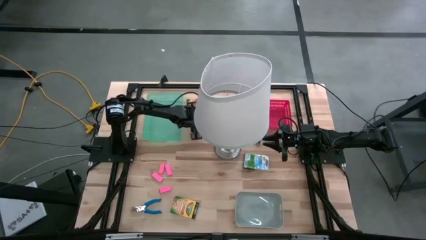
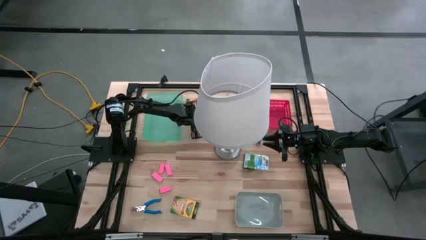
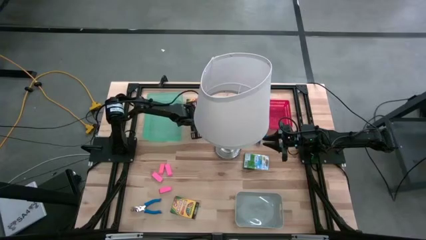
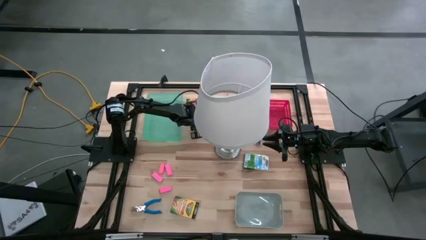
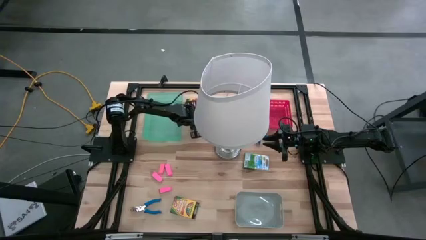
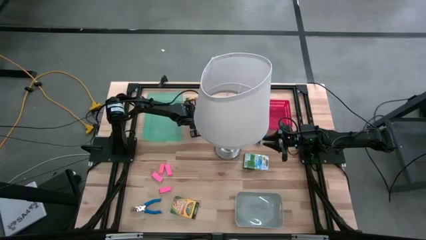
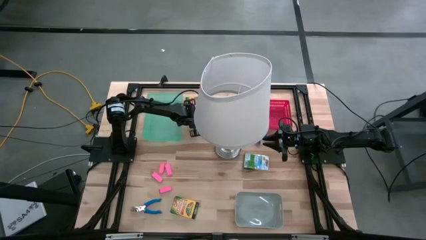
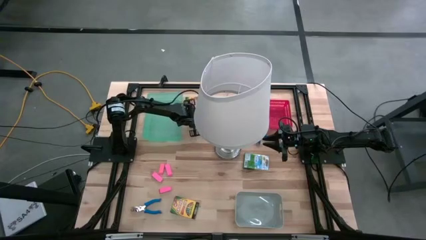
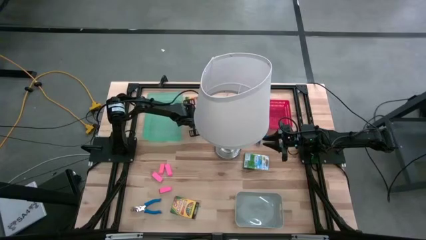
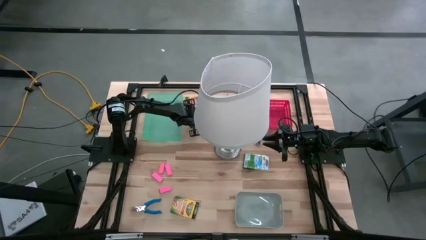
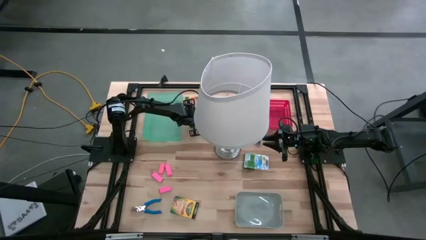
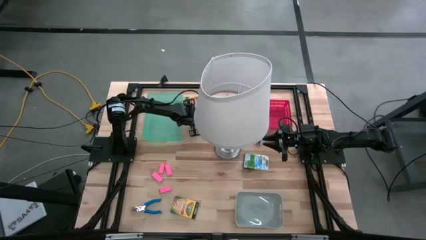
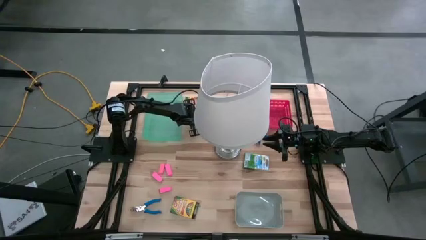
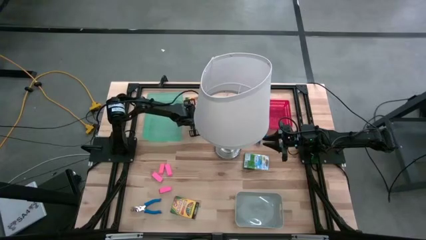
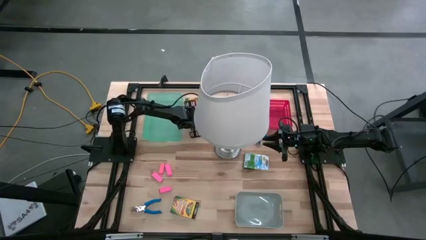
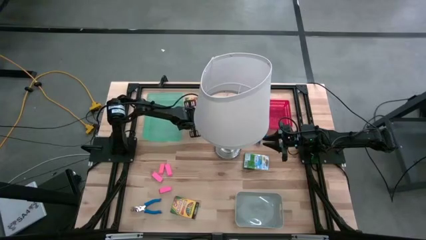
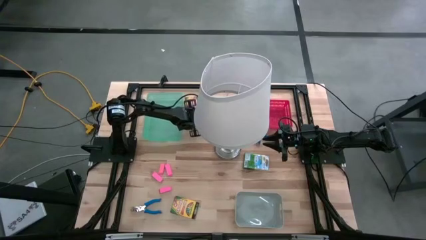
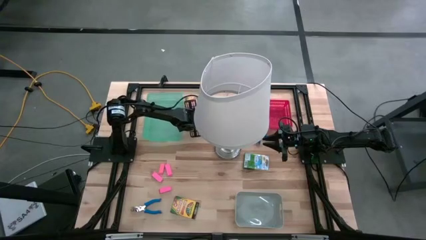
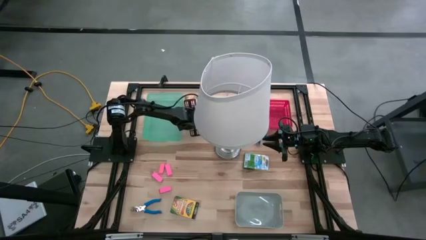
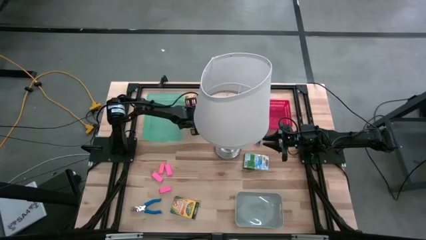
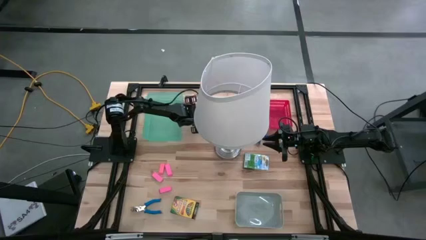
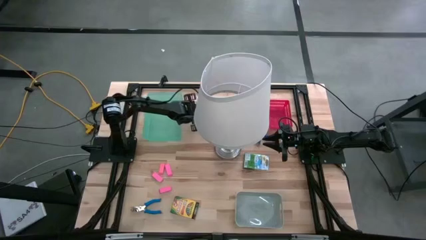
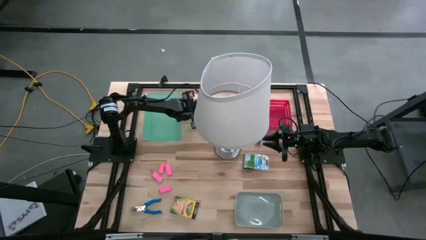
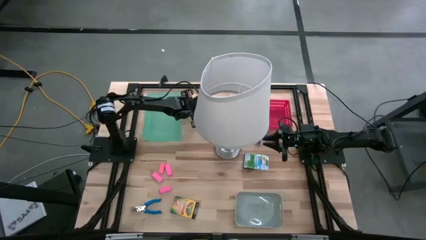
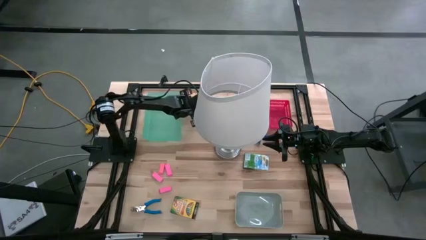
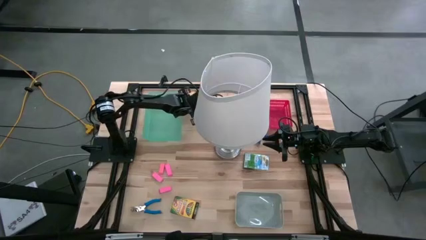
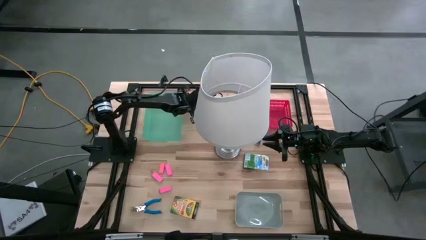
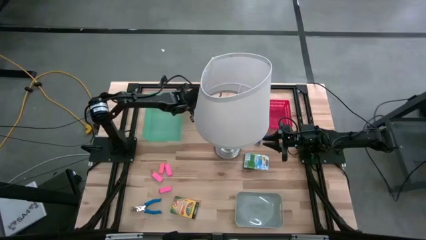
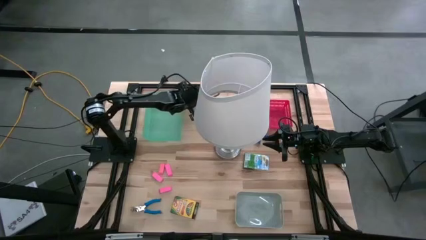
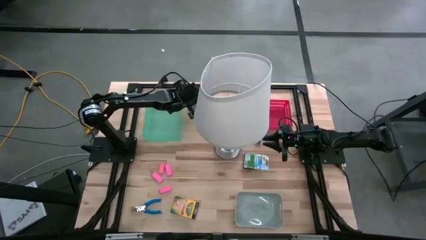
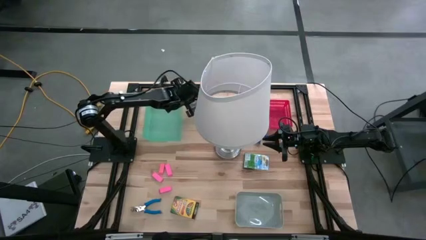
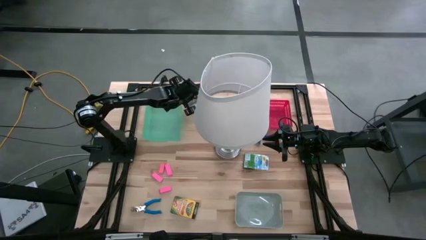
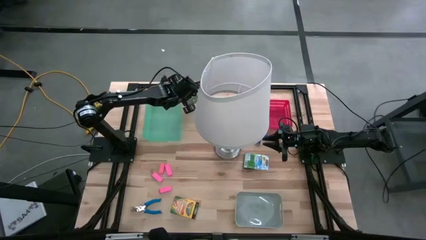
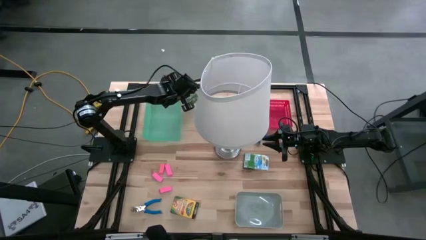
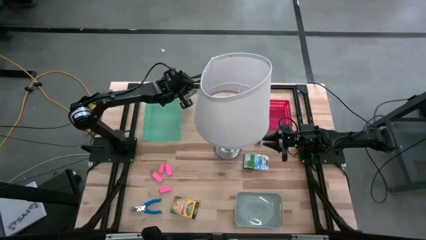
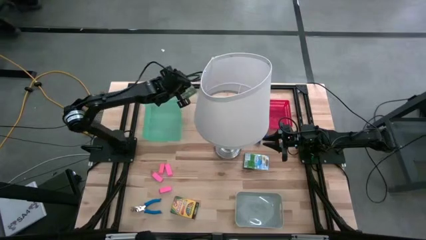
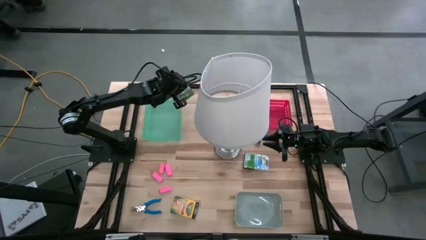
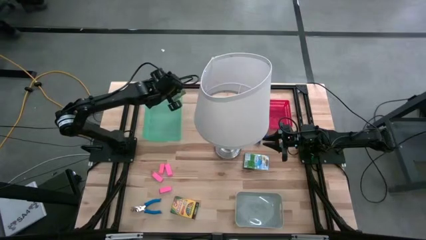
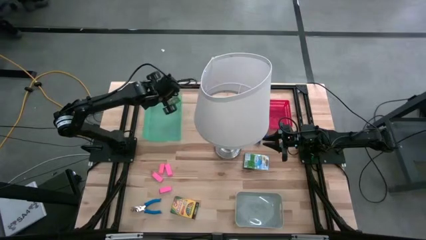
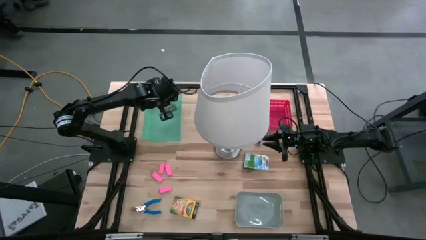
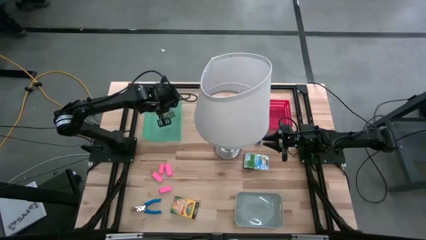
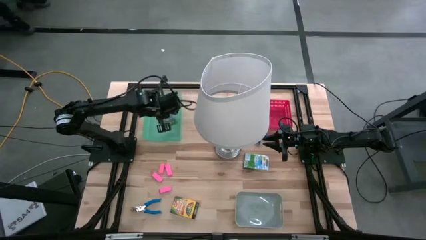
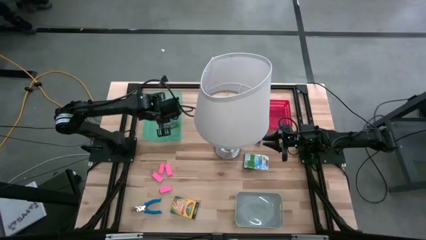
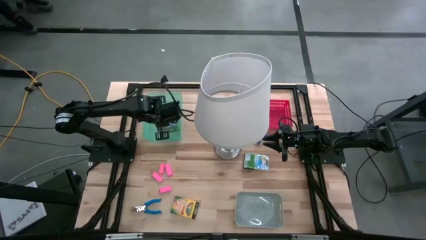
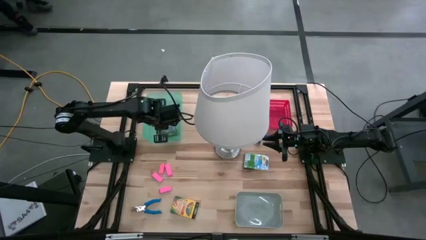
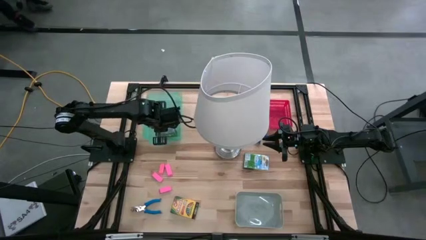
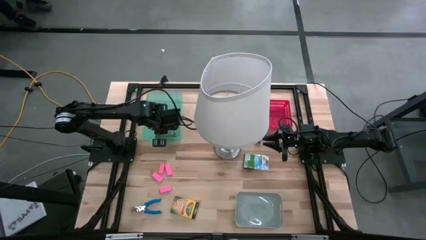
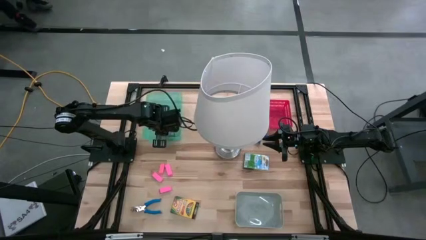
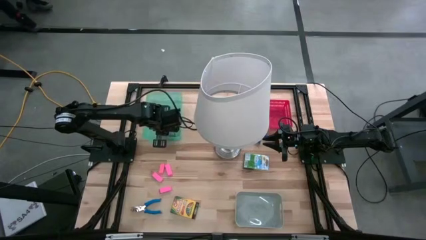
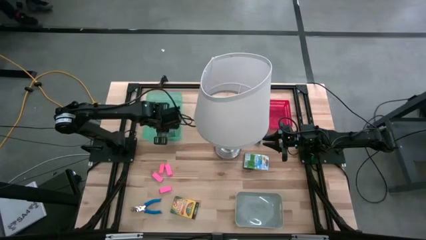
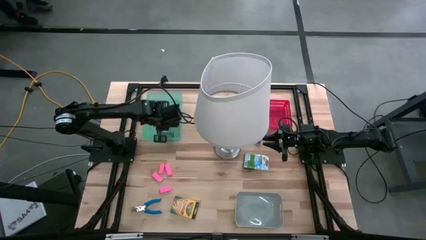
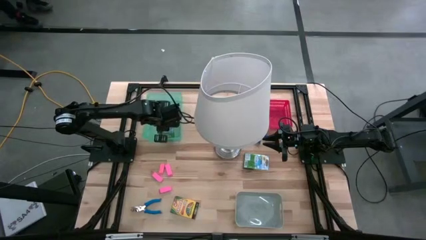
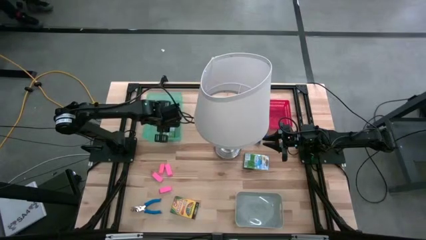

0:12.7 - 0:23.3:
Task: Pick & Place School Supplies
Put the yellow crayon box into the green bin

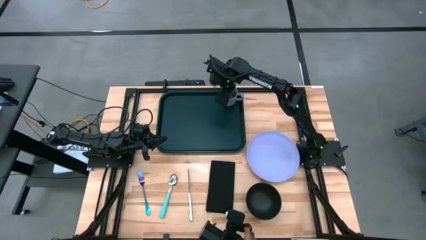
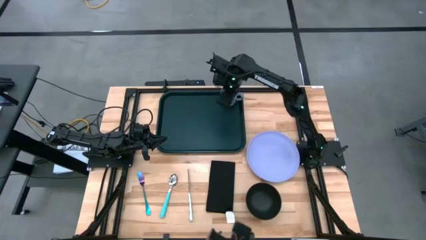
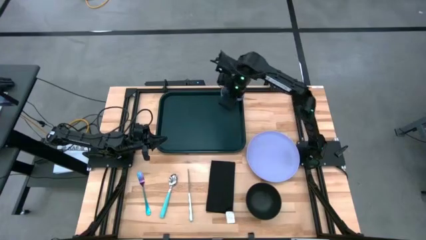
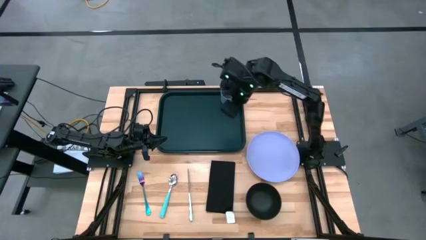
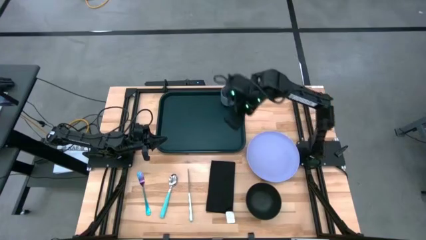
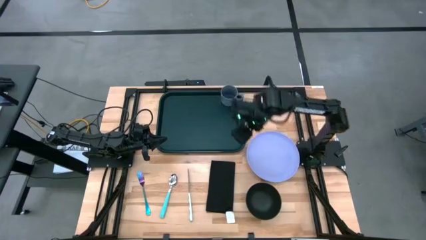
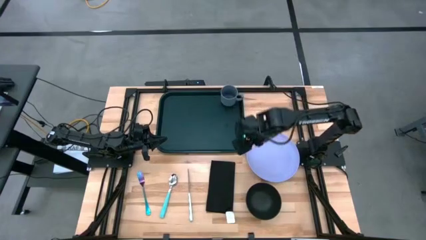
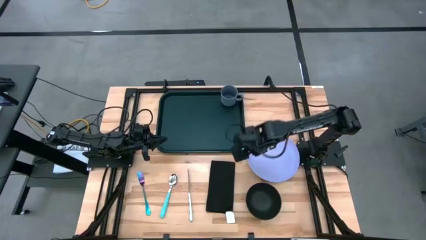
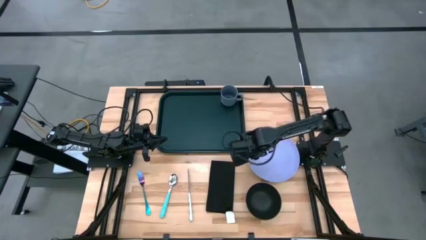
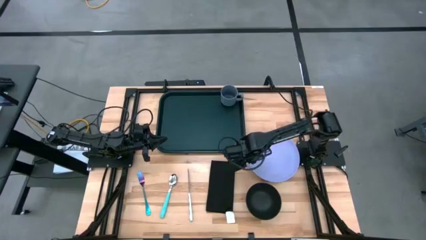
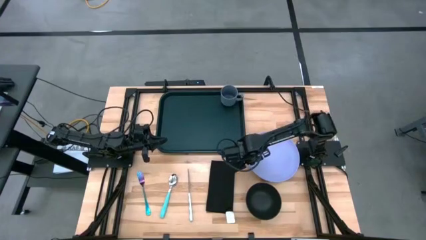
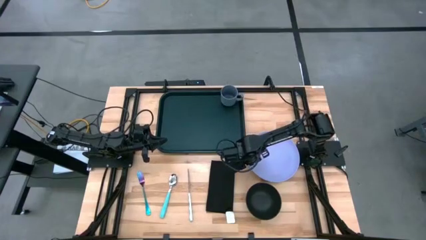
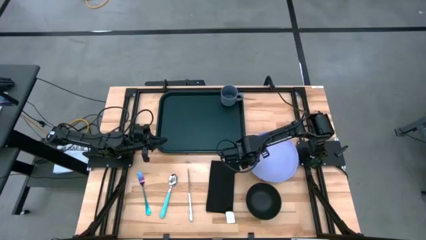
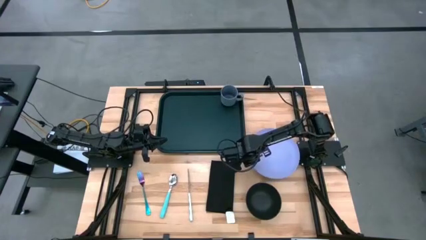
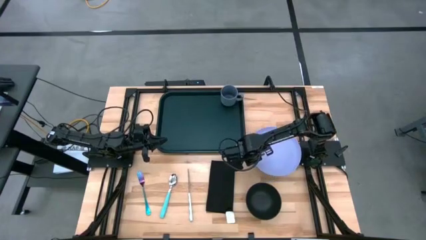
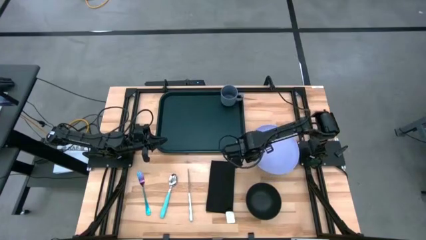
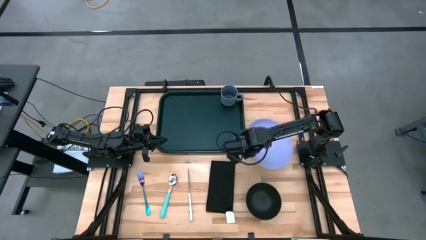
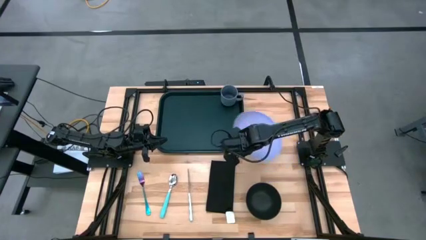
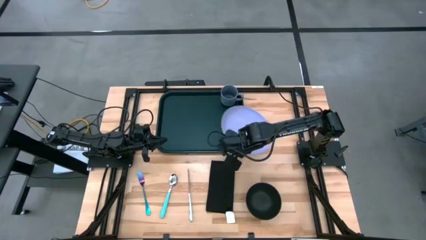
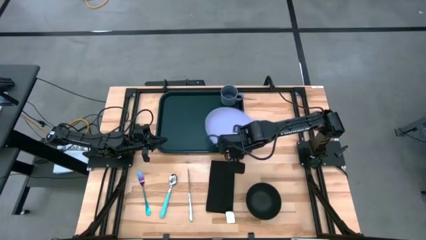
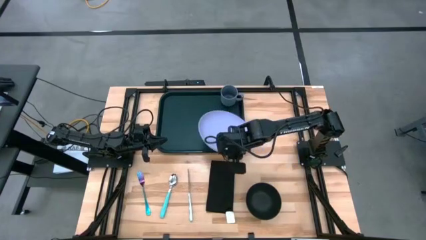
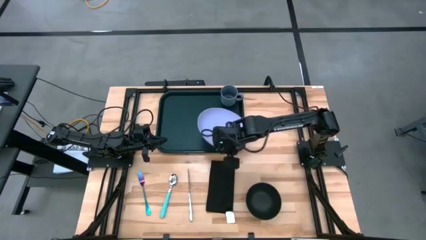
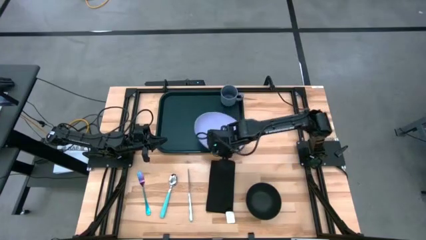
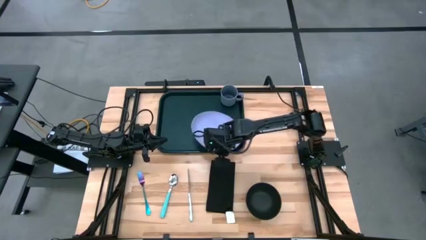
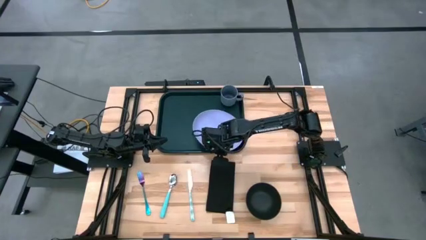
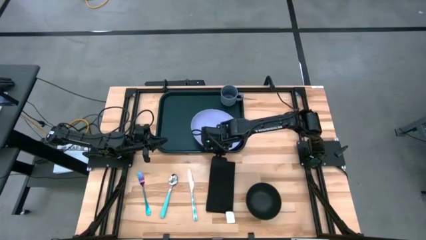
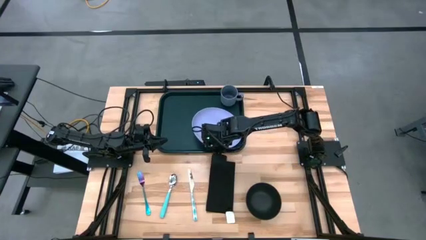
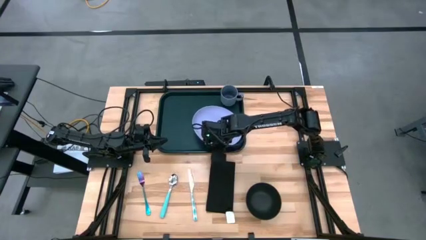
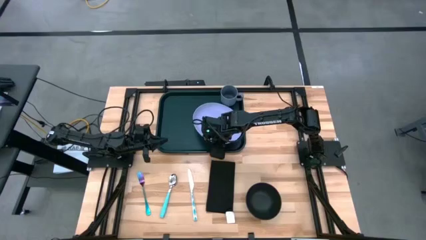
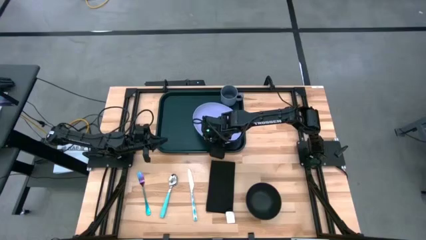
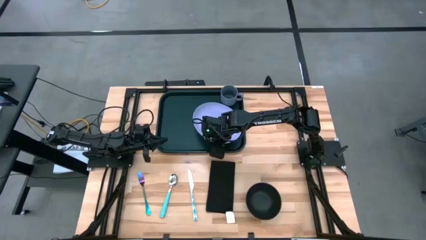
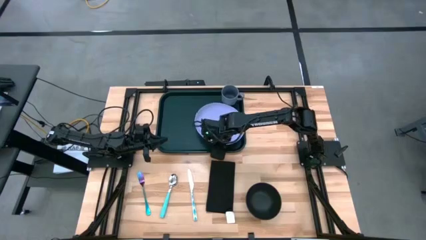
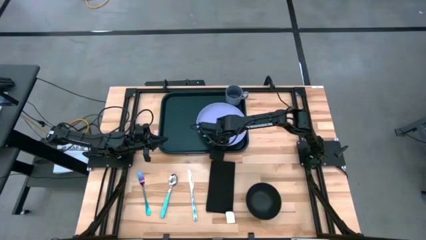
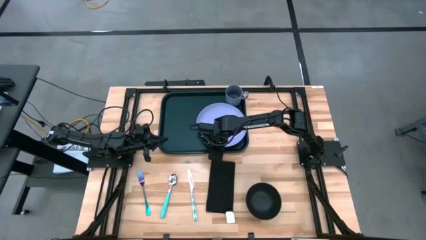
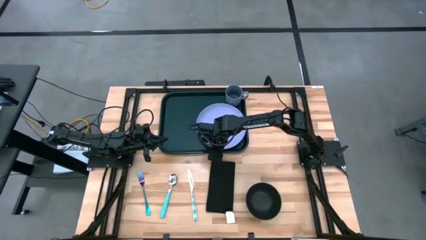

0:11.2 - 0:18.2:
Task: Set up tray
Put the violet plate to the bottom right of the black tray
